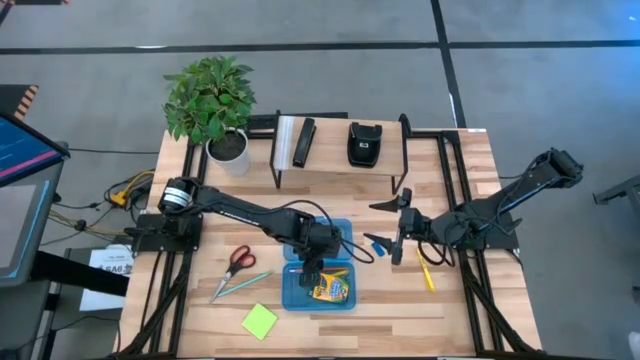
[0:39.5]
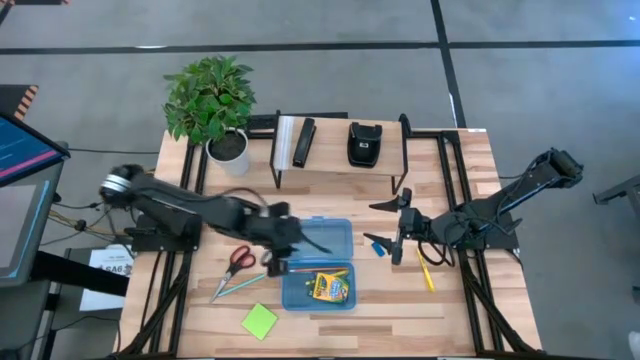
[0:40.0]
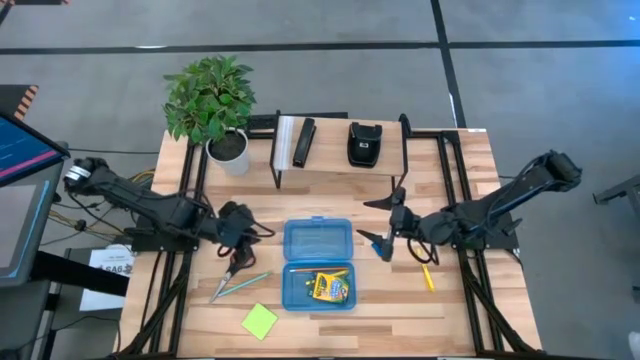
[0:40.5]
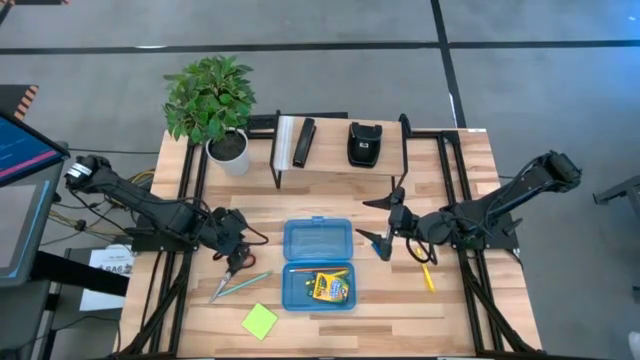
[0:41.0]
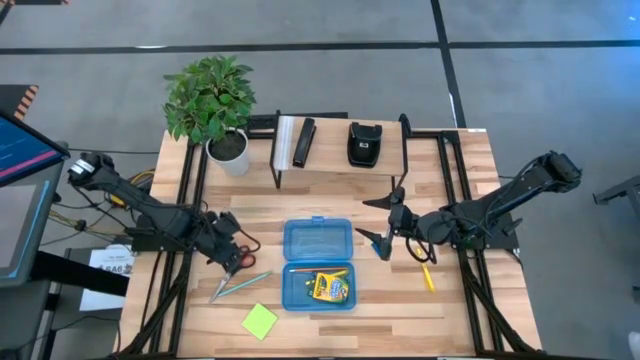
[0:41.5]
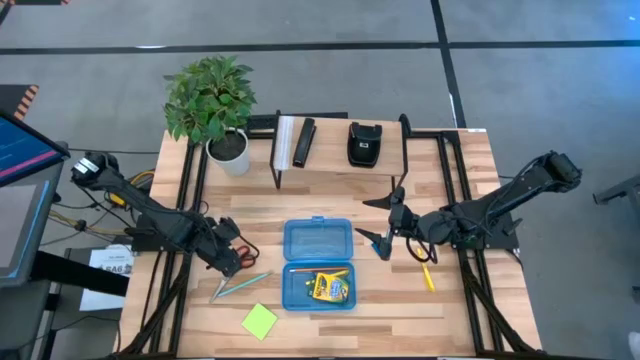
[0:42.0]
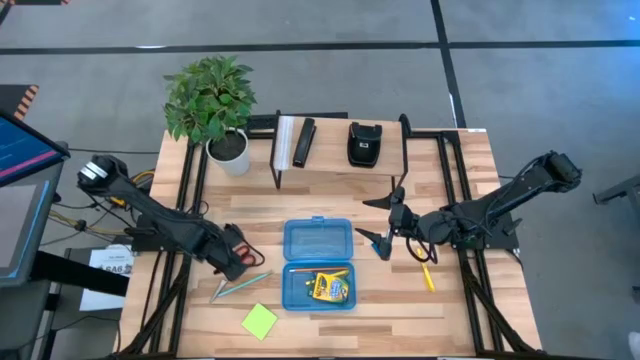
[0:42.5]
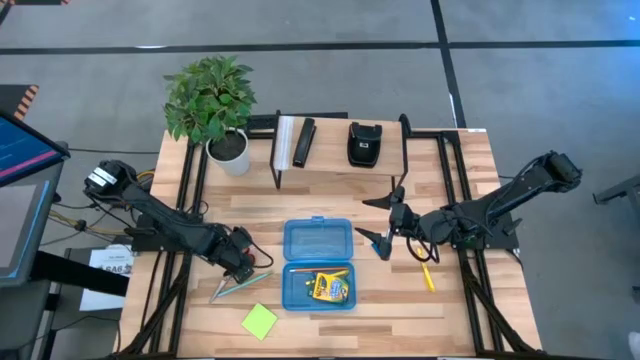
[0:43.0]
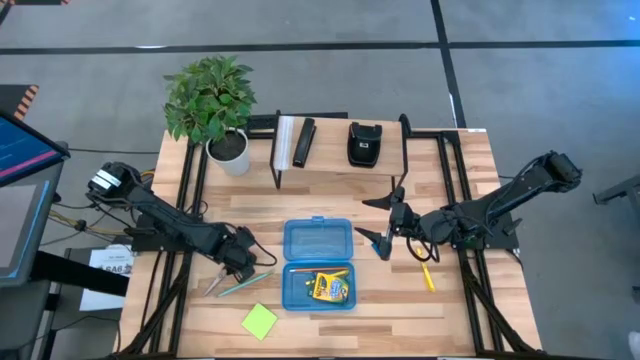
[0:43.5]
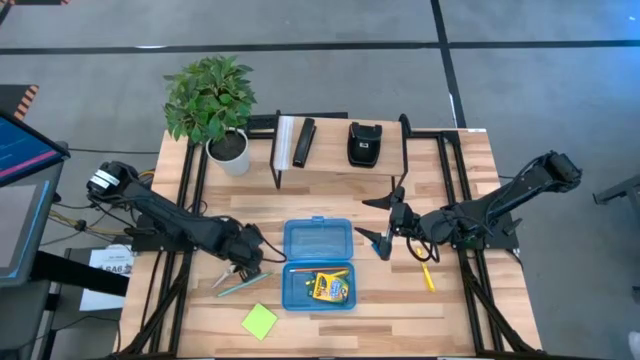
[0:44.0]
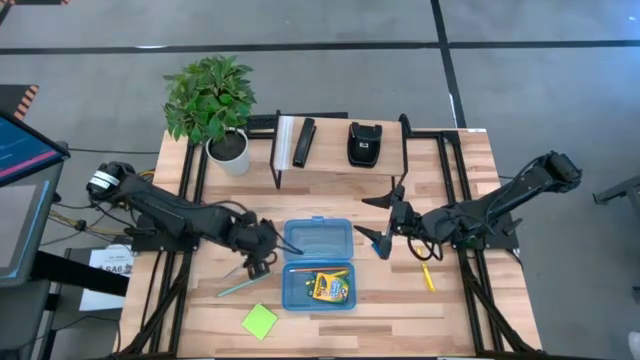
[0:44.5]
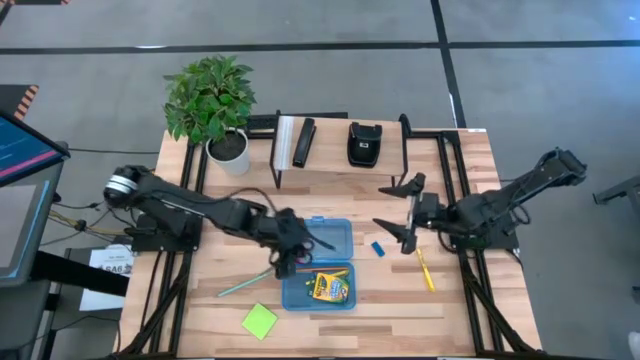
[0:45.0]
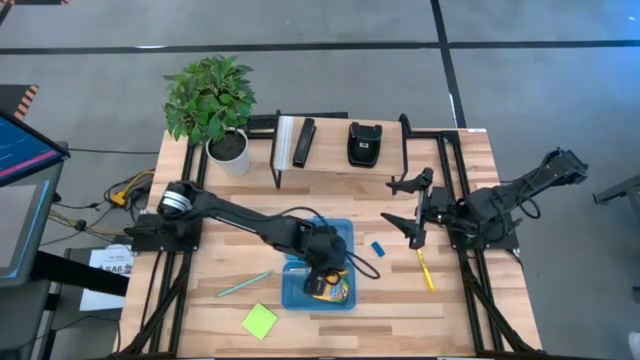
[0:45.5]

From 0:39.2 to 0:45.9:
Task: Pack school essentials
Put the black scissor into the blue supply box

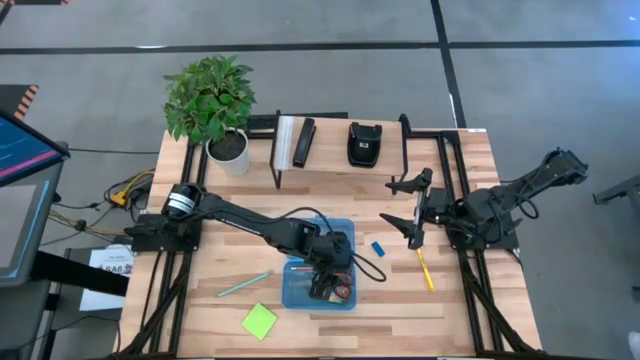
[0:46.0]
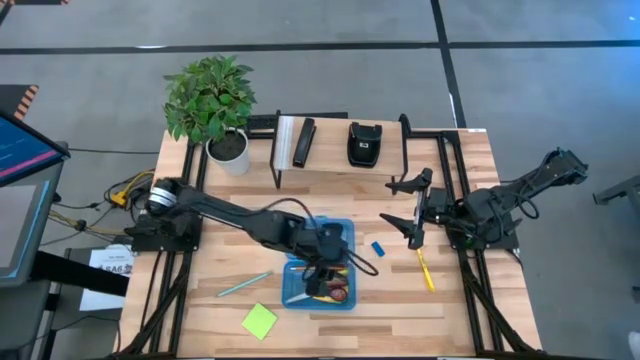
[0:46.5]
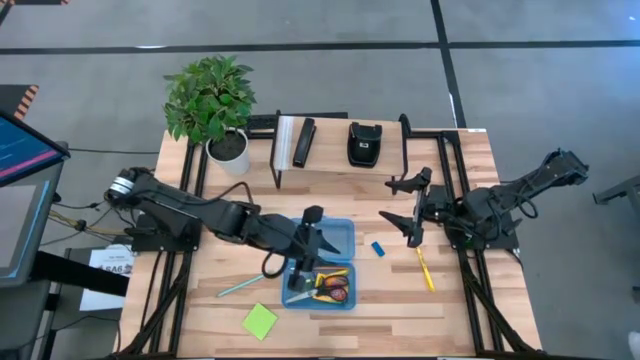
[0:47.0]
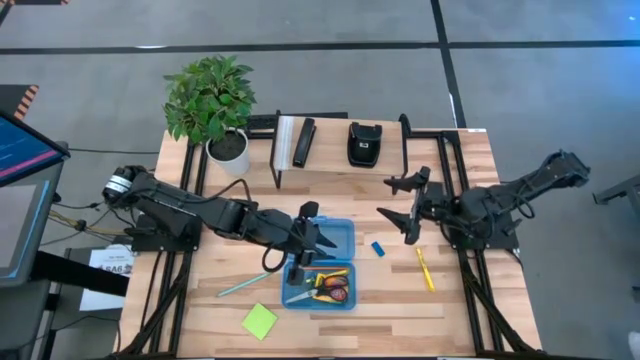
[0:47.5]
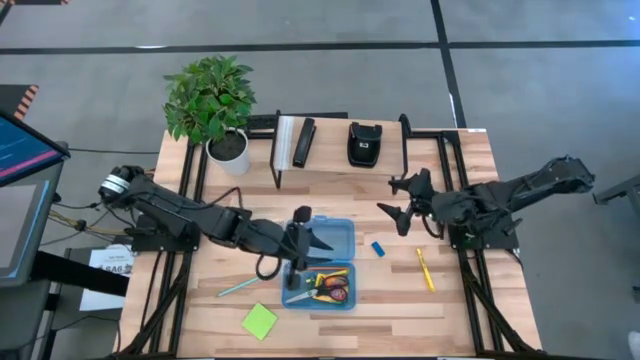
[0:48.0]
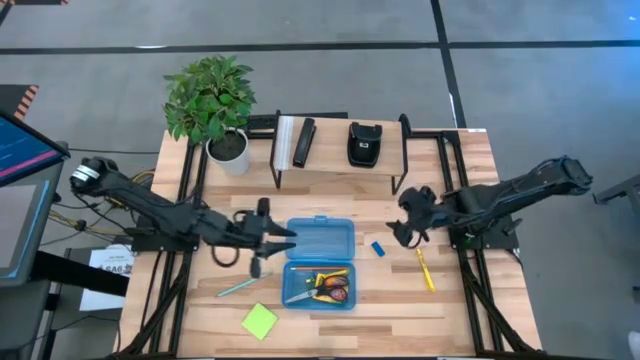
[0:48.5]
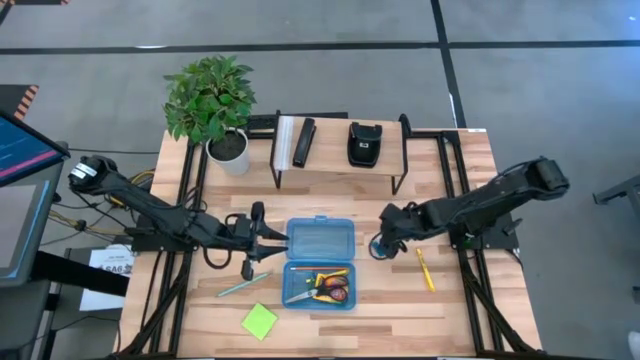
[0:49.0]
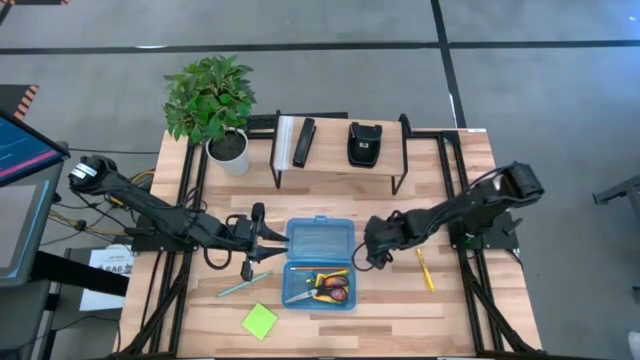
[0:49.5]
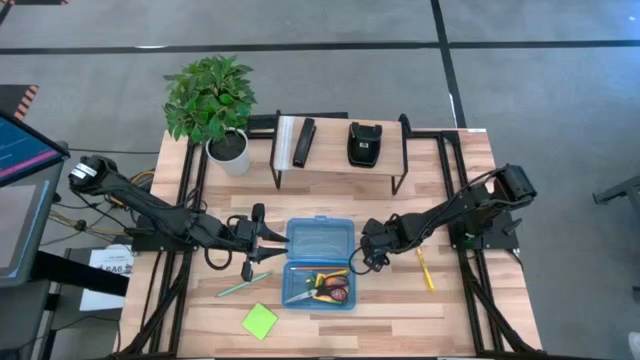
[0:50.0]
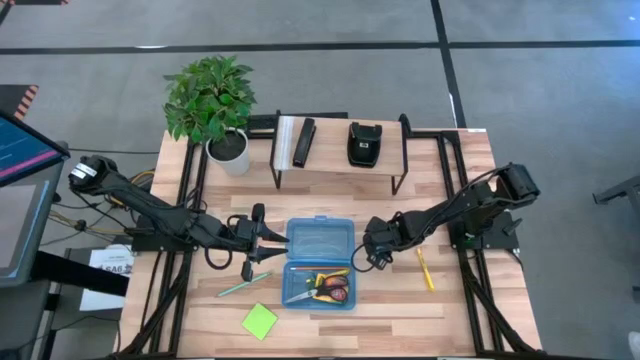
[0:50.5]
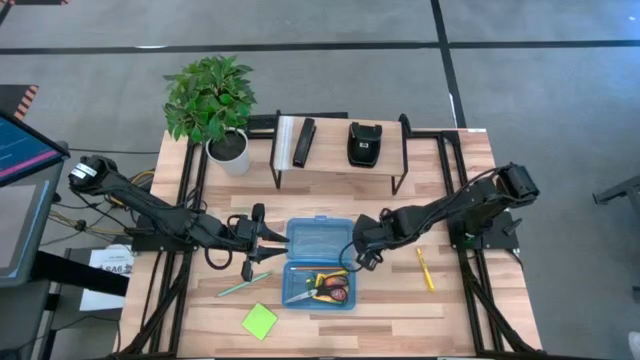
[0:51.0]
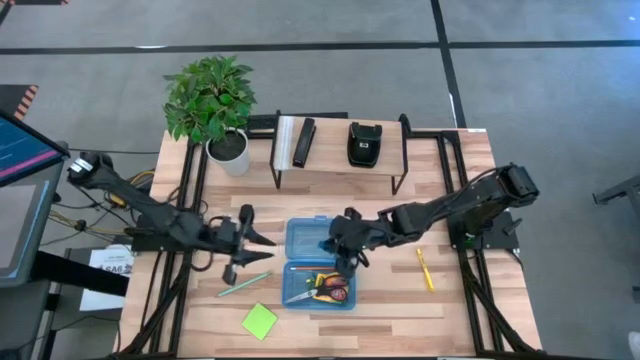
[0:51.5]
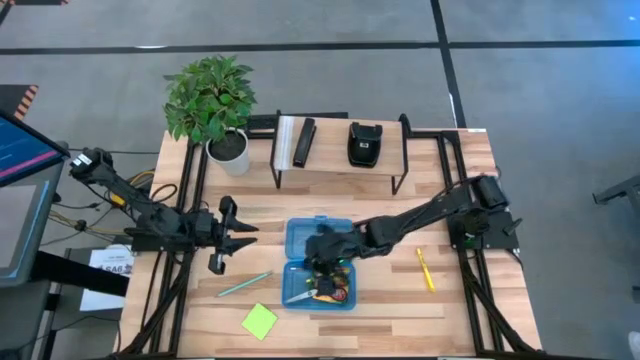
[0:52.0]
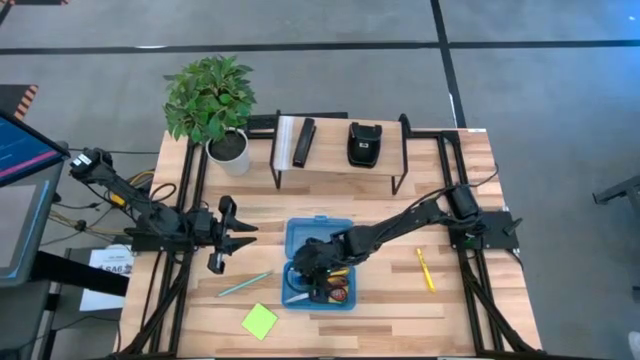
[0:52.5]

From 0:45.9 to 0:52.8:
Put the blue eraser into the blue supply box

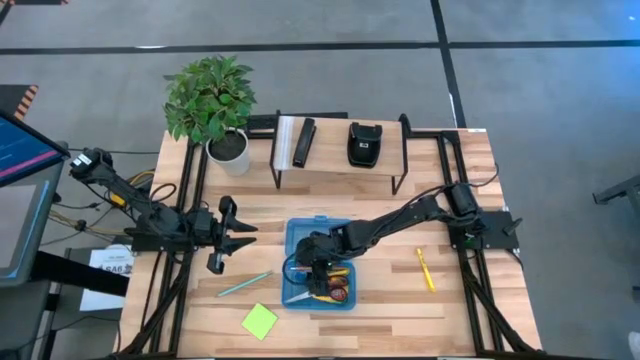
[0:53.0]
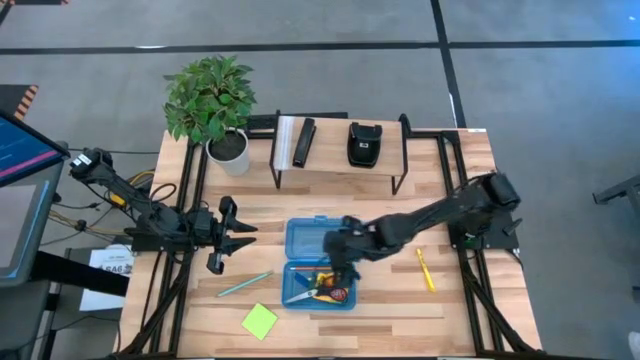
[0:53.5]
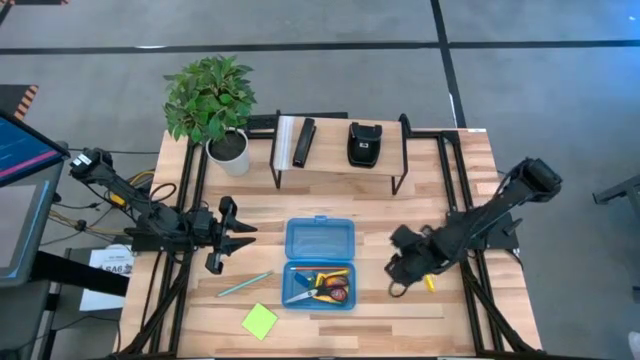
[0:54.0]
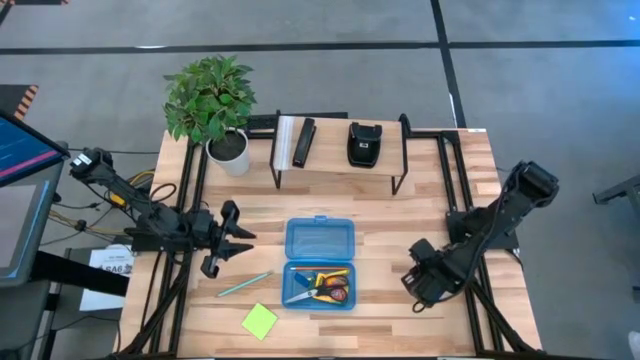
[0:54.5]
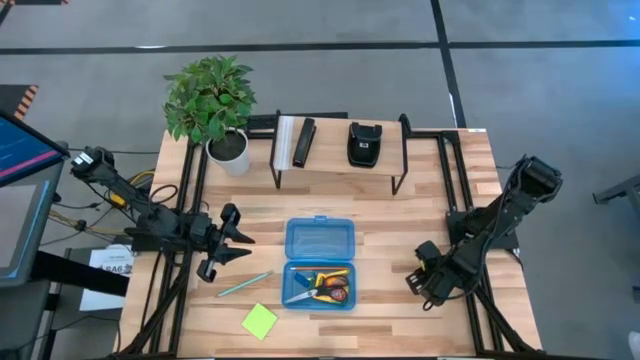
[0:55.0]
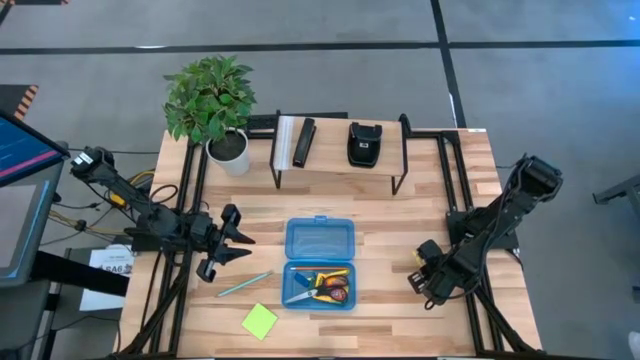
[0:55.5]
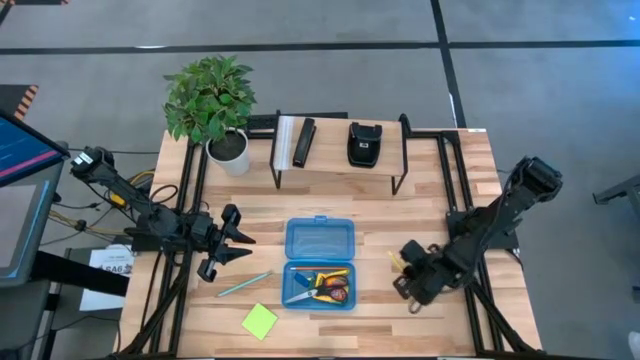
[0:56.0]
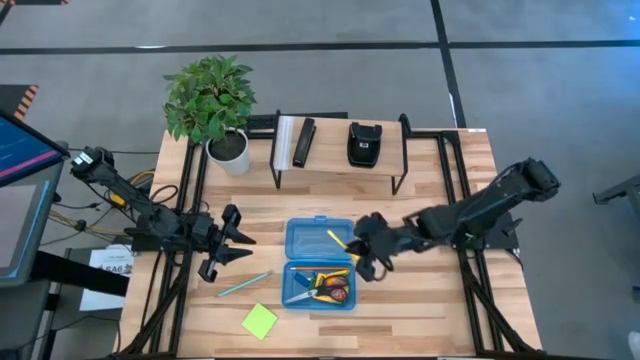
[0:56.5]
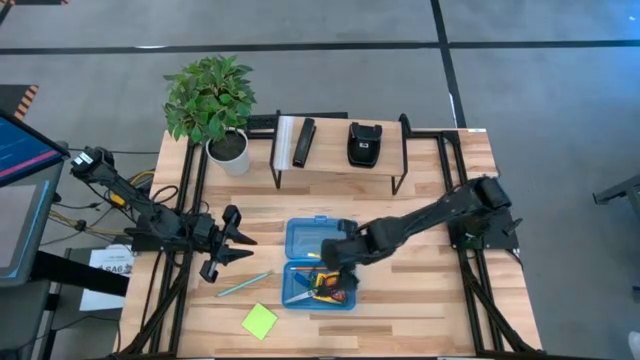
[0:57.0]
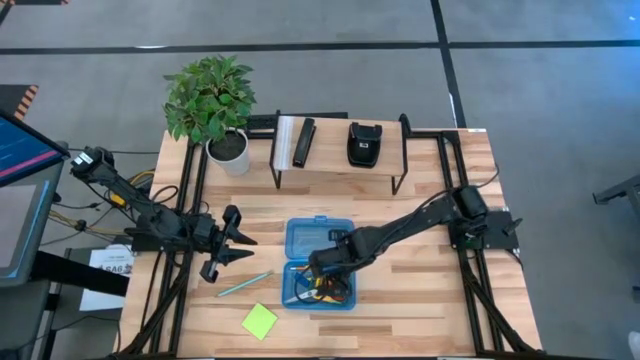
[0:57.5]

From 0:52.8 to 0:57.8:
Put the yellow highlighter pen into the blue supply box

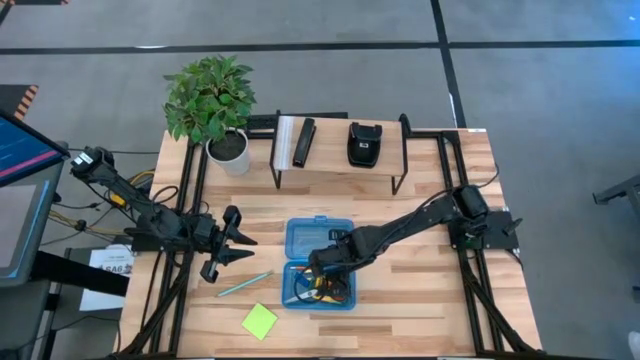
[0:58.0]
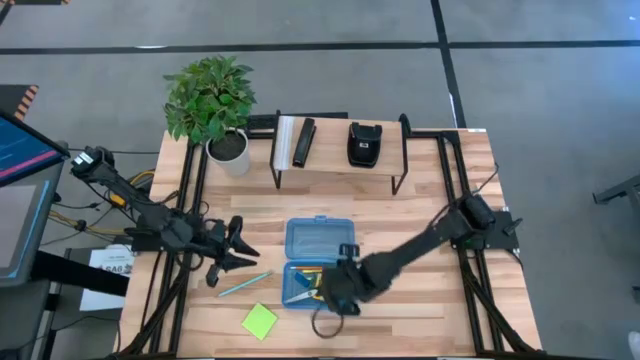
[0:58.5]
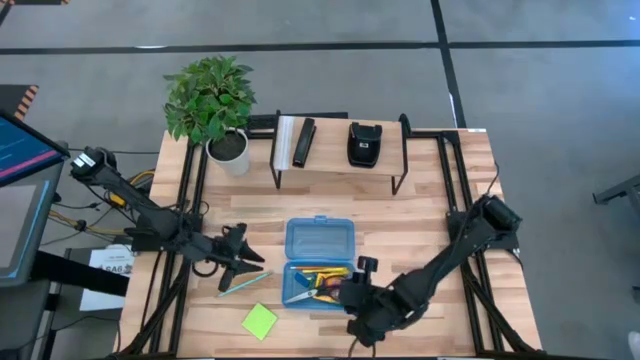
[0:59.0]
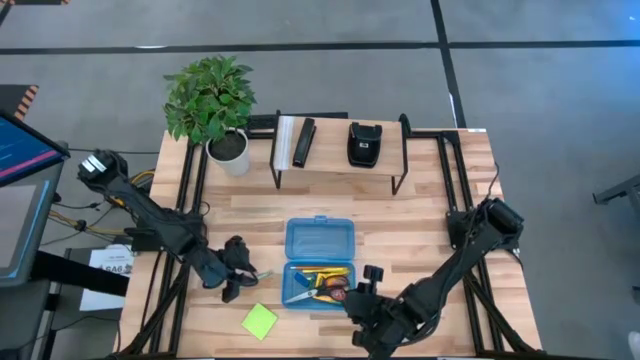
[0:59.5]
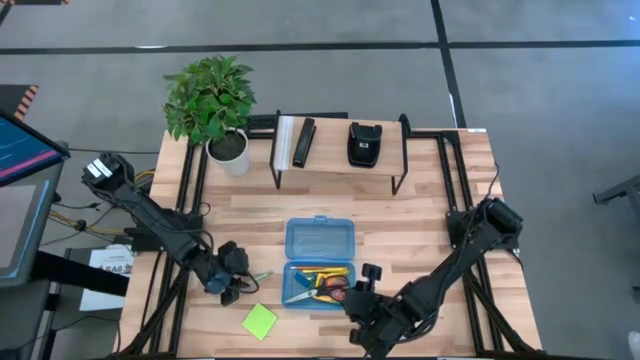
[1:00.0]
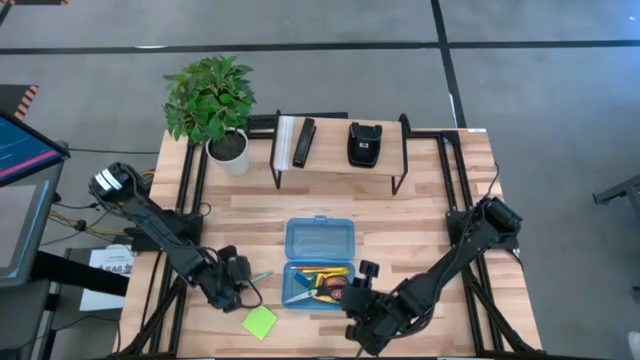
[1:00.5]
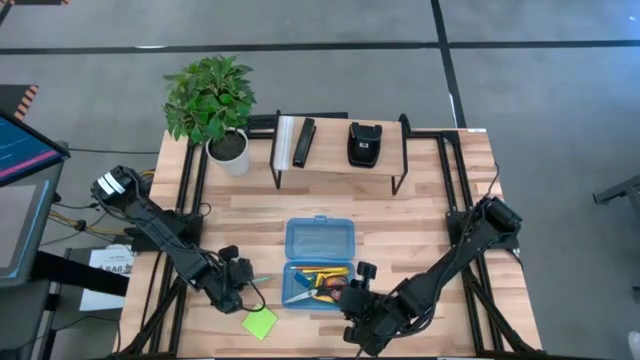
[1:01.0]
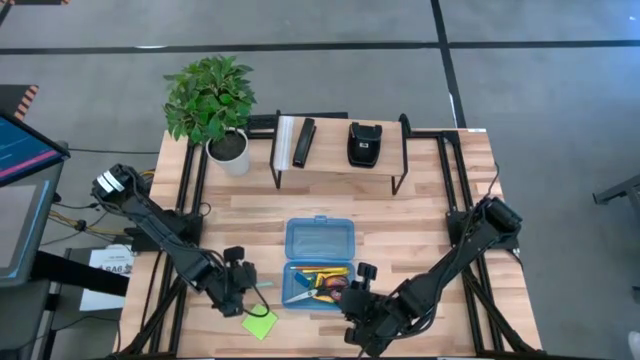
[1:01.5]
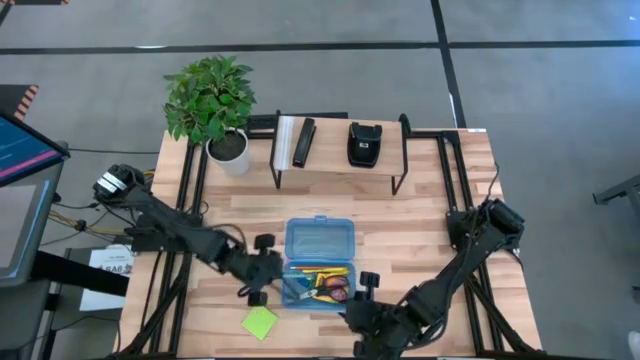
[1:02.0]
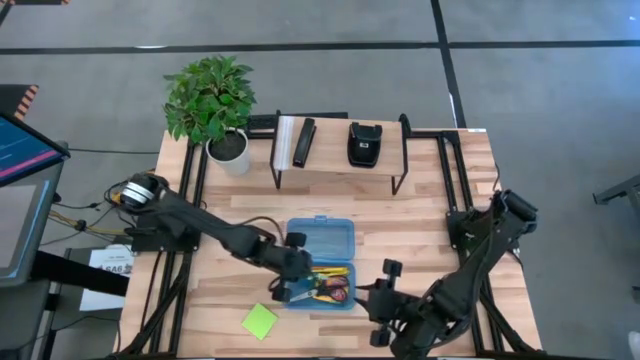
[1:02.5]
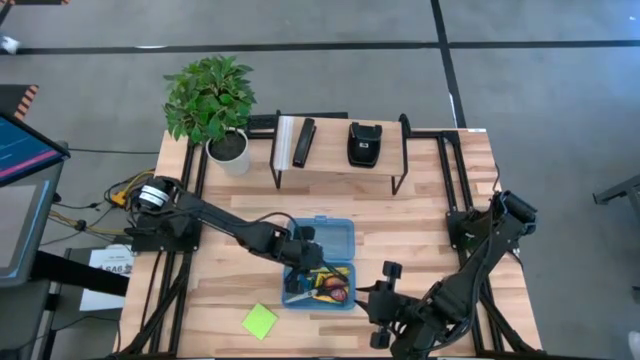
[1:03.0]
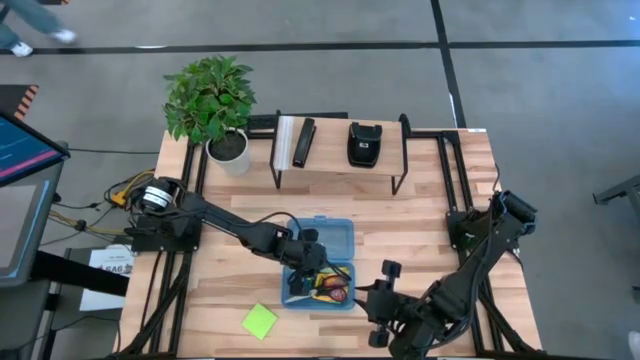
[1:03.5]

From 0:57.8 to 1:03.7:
Put the green pencil into the blue supply box
